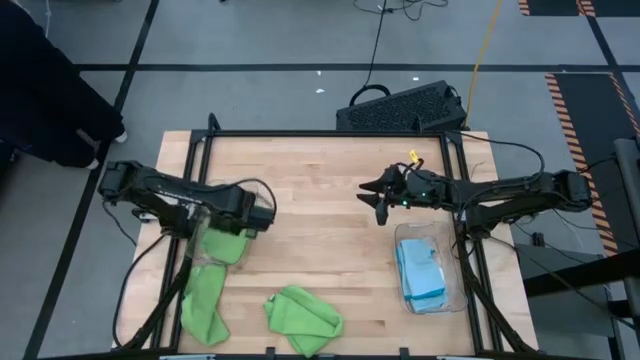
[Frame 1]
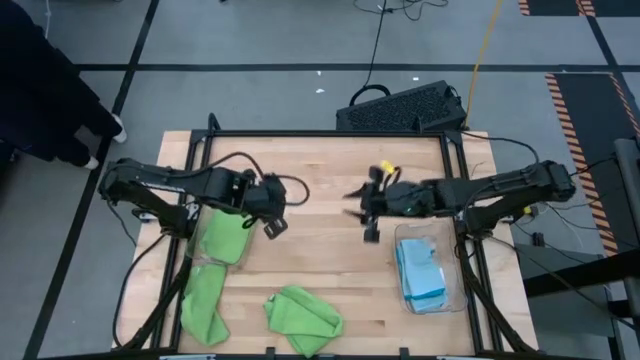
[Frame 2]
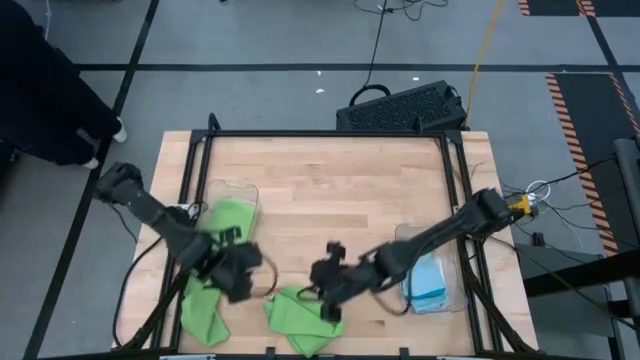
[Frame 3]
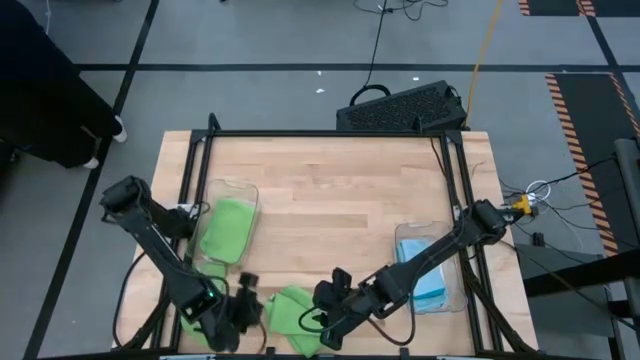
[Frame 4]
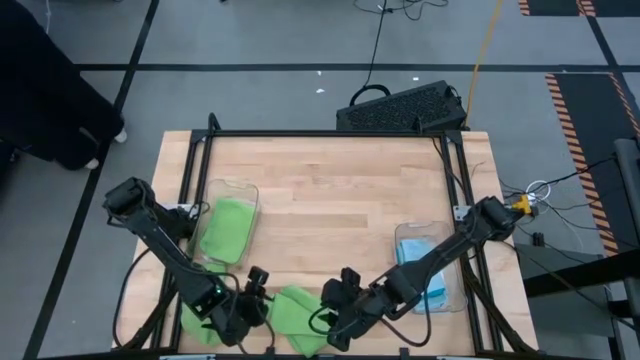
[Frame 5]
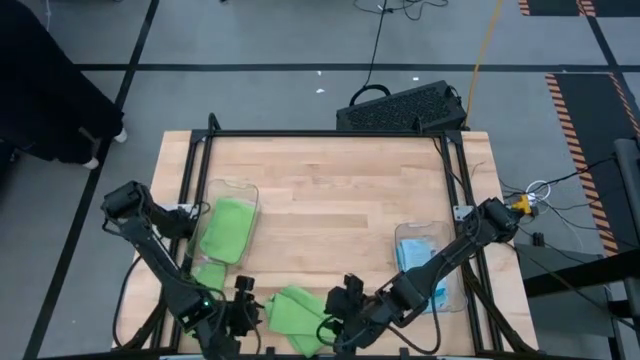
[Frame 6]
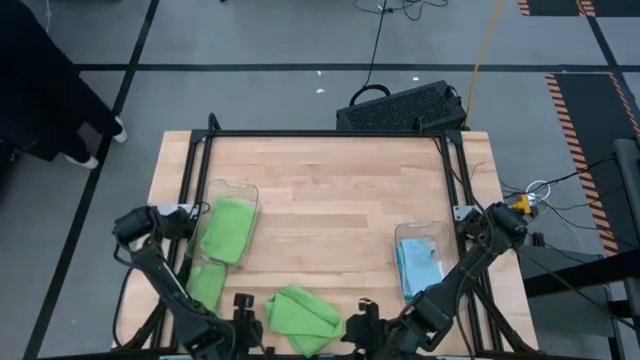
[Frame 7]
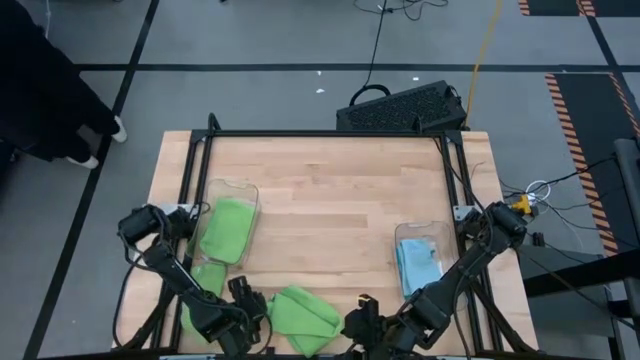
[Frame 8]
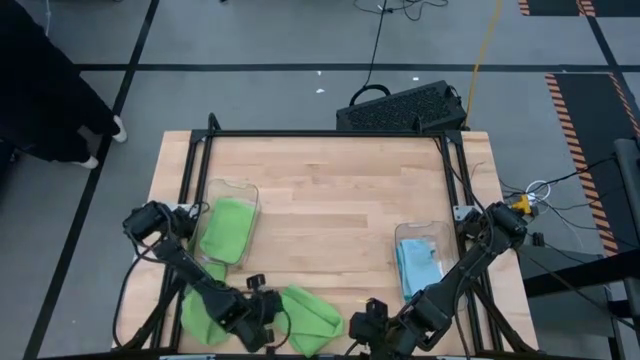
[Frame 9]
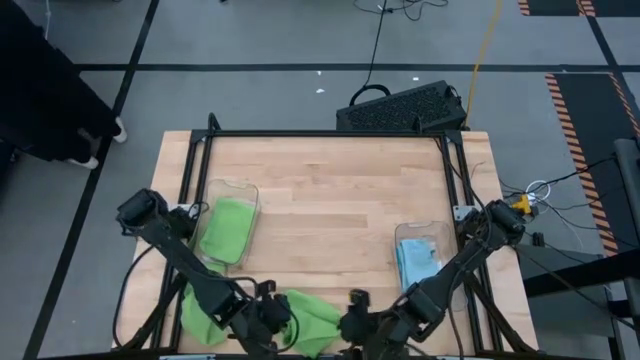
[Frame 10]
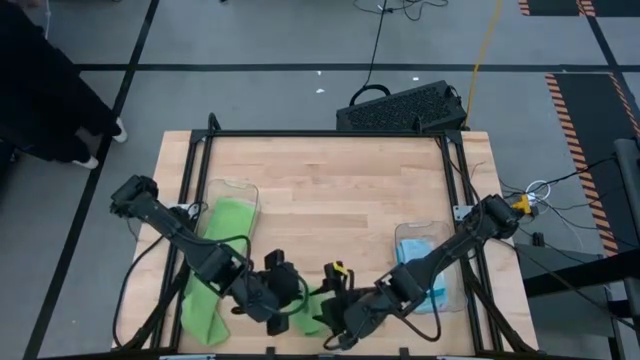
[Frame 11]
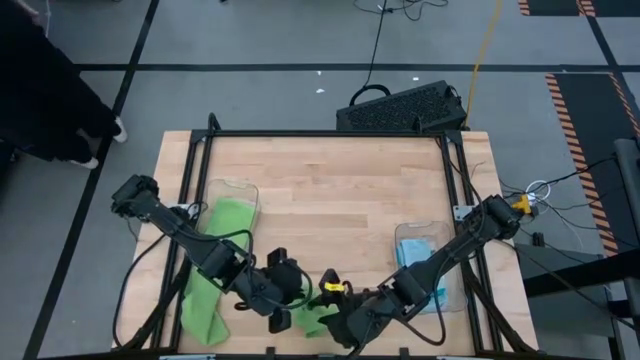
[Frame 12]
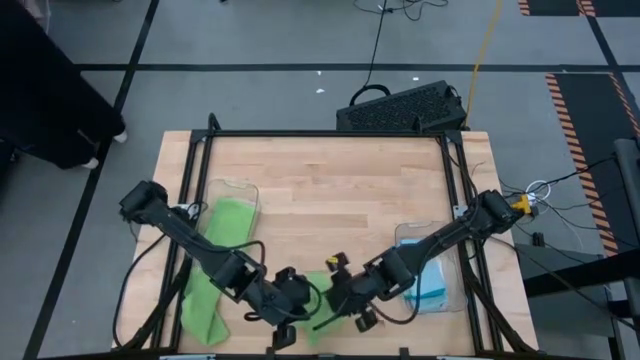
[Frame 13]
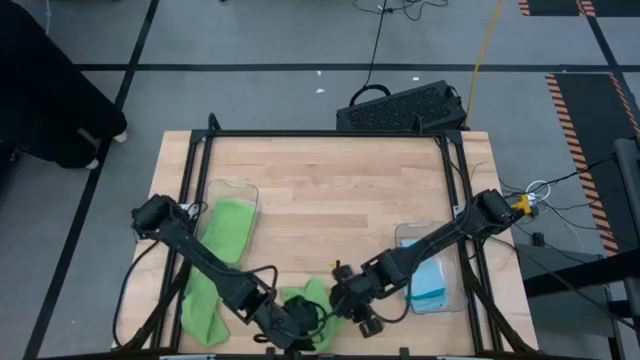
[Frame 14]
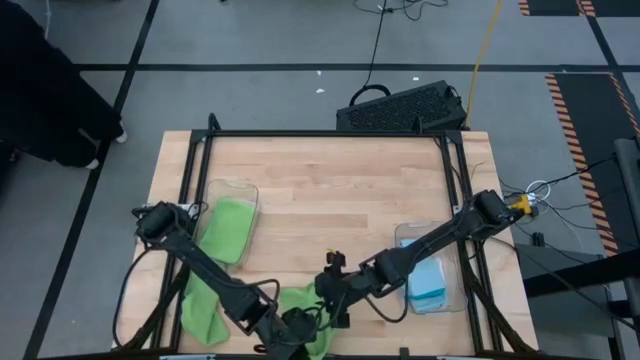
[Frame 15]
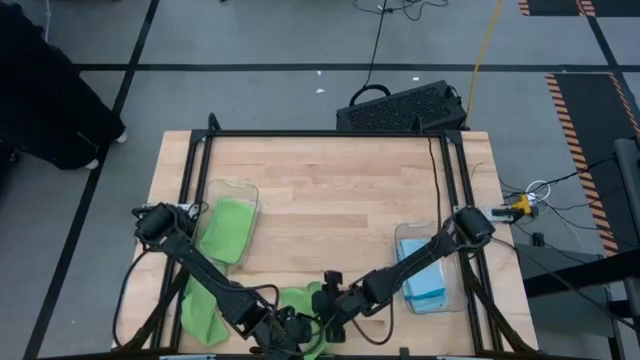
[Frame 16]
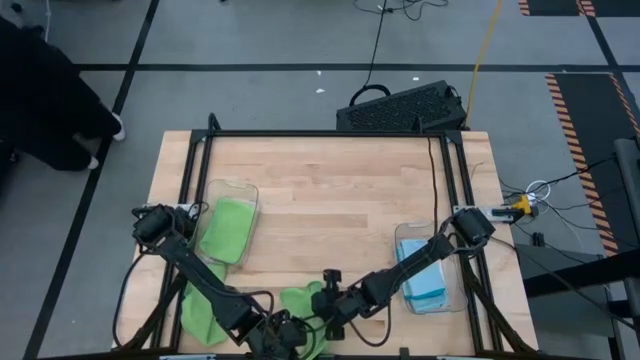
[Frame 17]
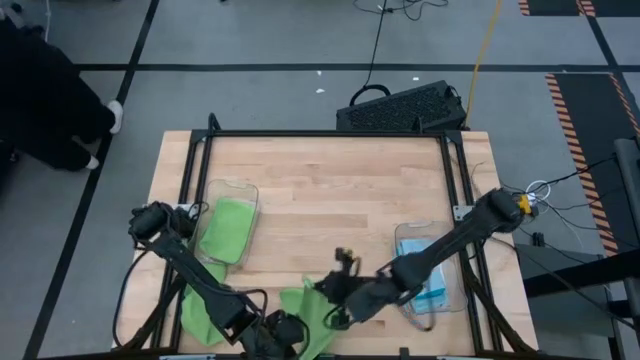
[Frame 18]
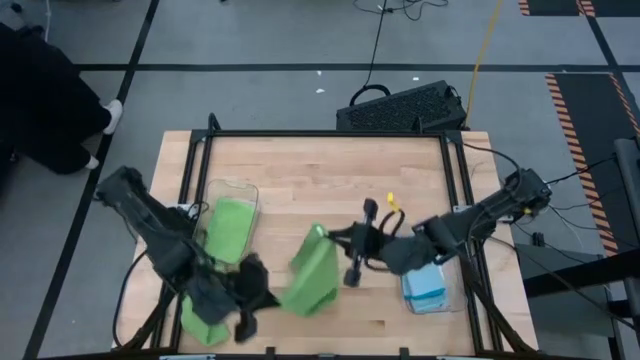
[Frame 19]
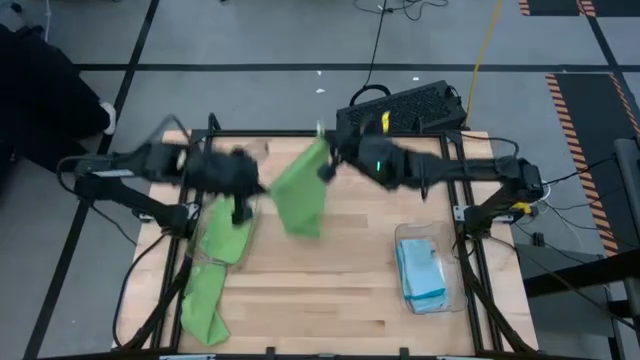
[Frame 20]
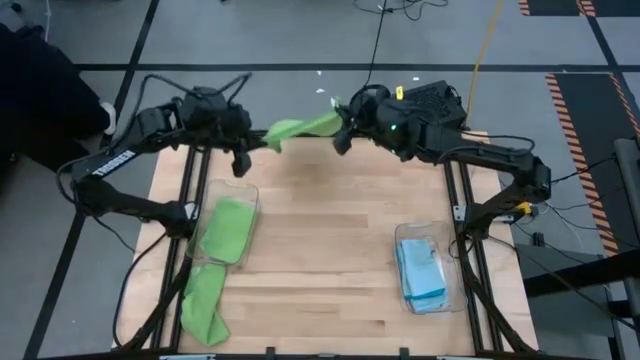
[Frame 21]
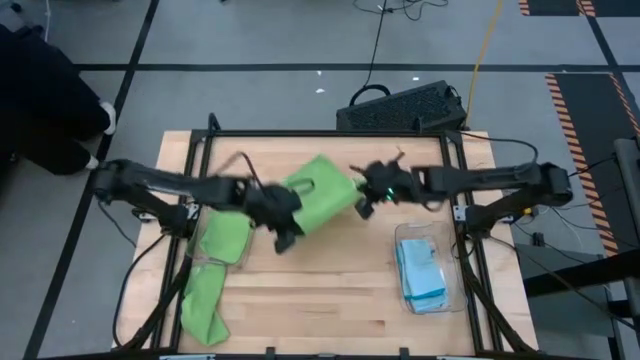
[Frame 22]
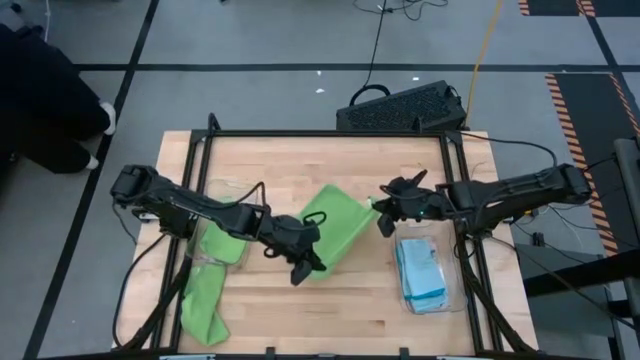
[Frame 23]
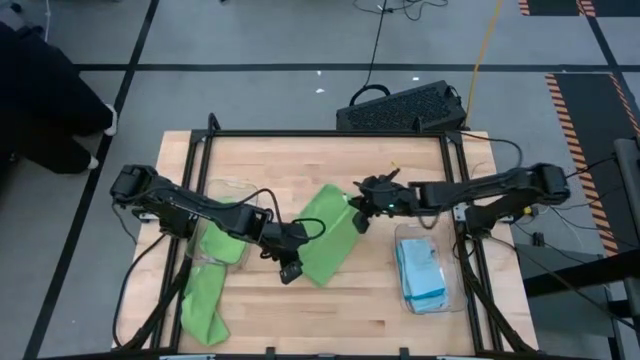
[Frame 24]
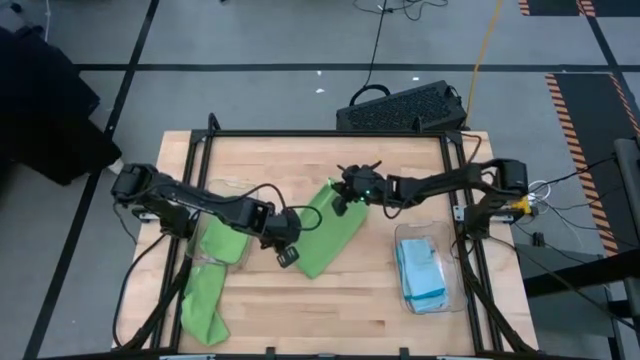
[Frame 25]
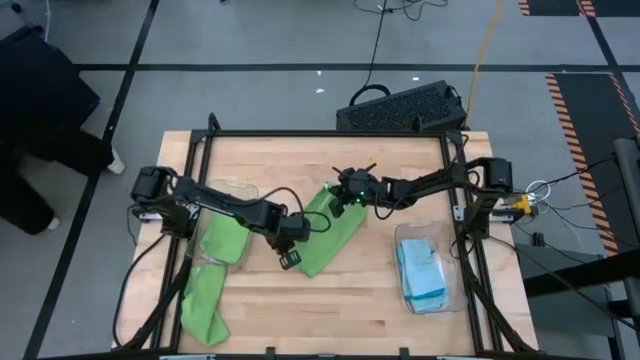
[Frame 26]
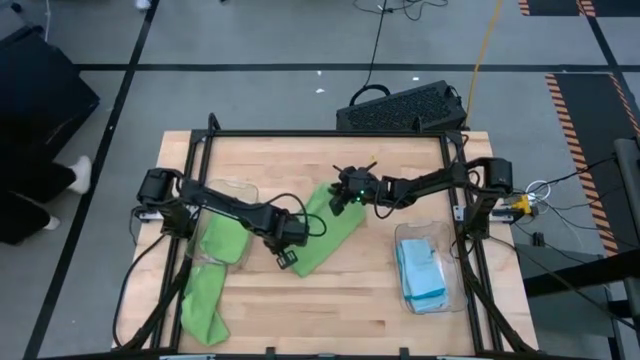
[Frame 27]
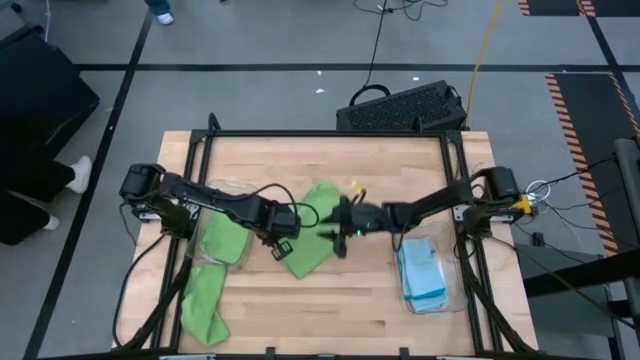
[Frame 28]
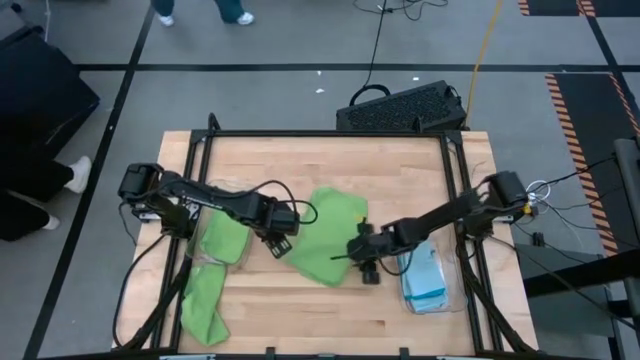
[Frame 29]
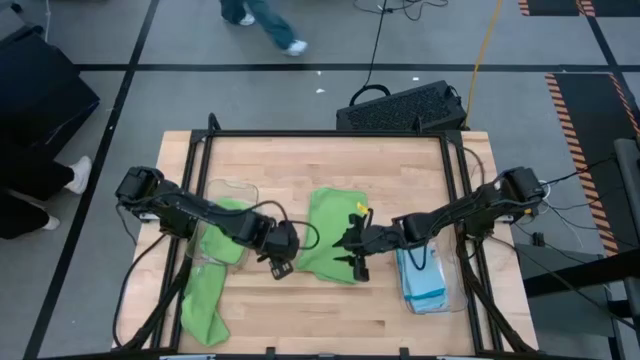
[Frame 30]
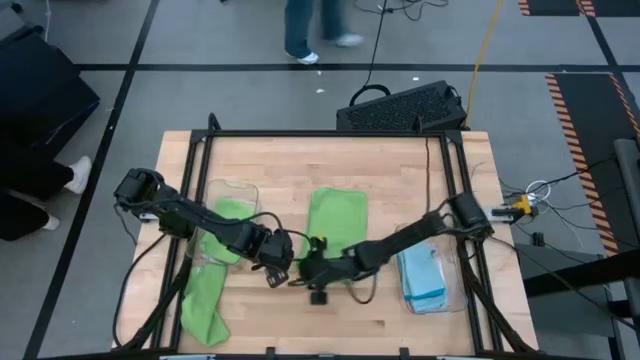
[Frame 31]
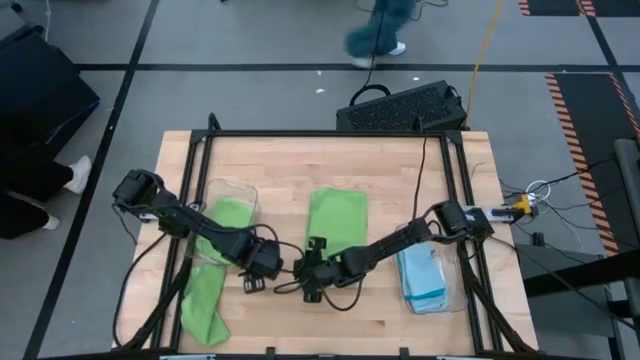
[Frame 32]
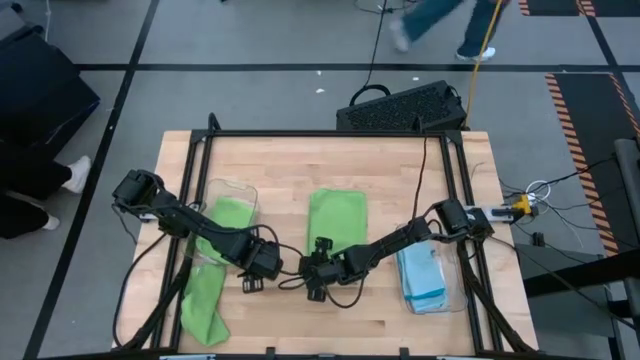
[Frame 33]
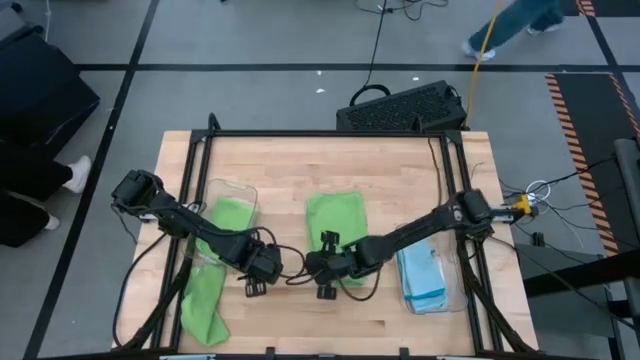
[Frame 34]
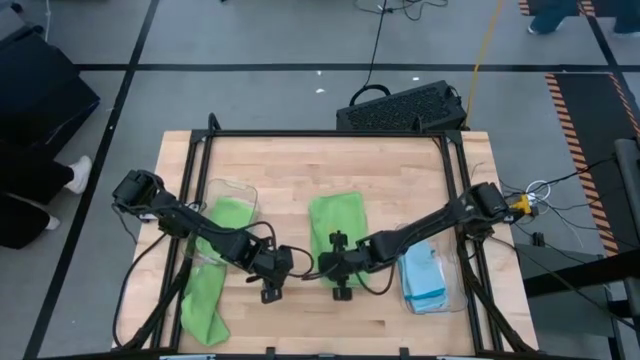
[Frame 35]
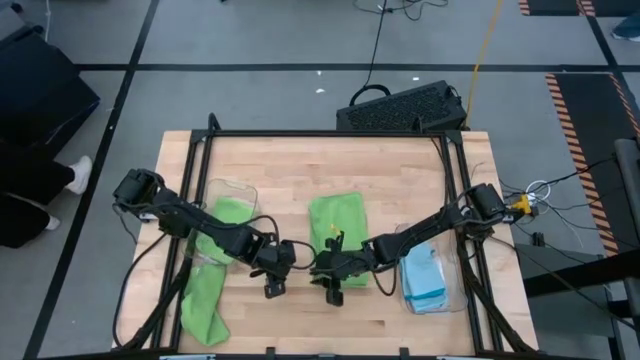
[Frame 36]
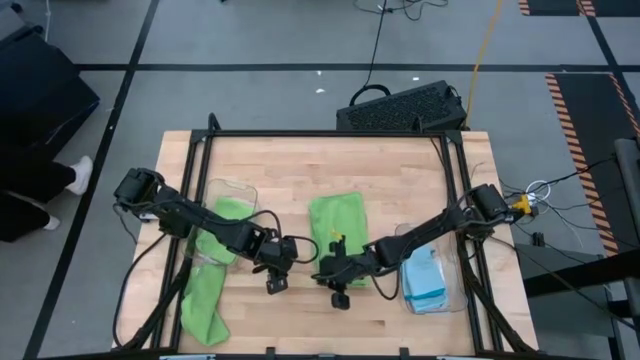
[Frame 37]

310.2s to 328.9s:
Task: Sort microfiber towel by color & place in baskets
Fold the right green microfiber towel
